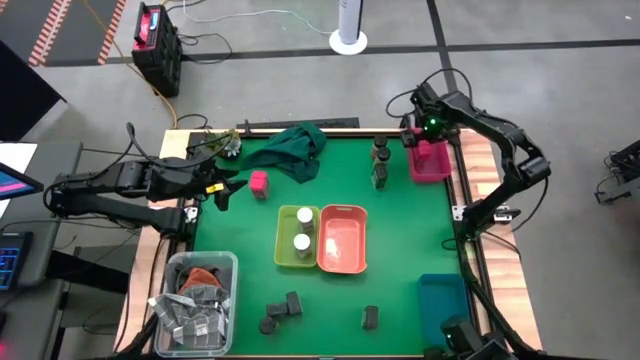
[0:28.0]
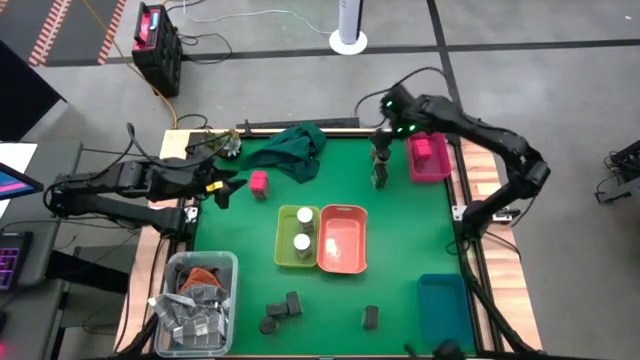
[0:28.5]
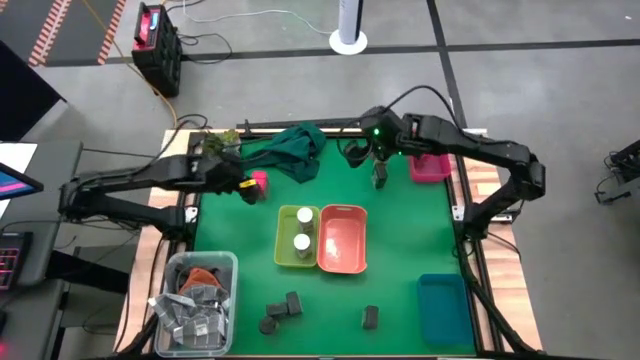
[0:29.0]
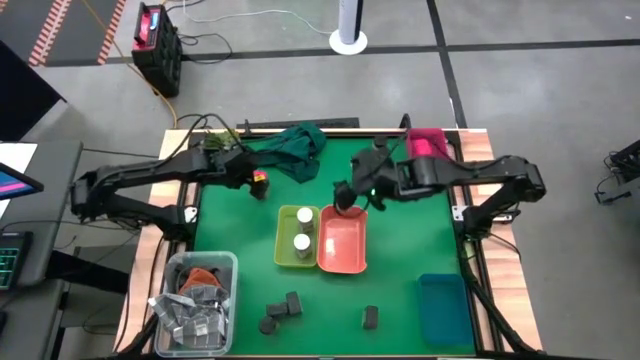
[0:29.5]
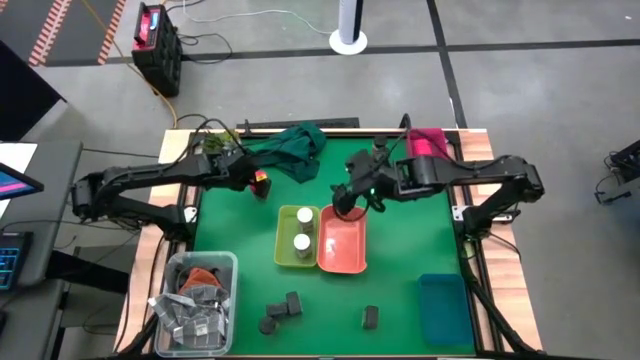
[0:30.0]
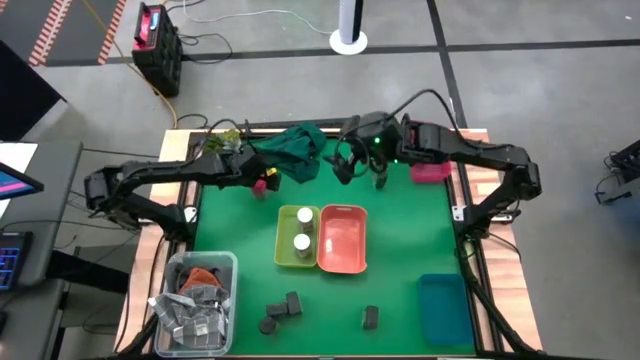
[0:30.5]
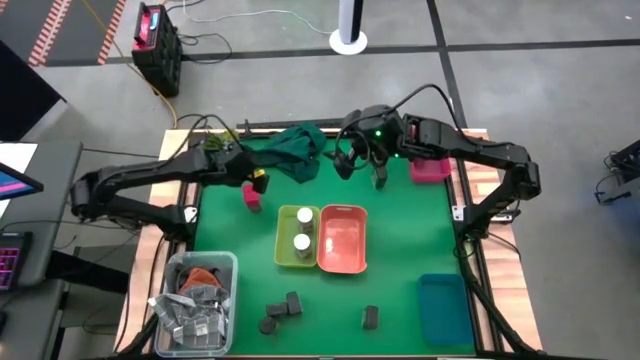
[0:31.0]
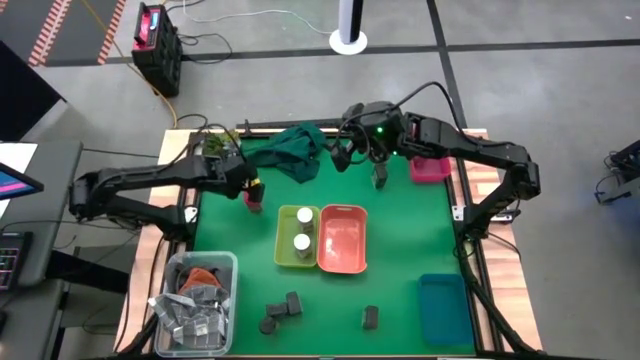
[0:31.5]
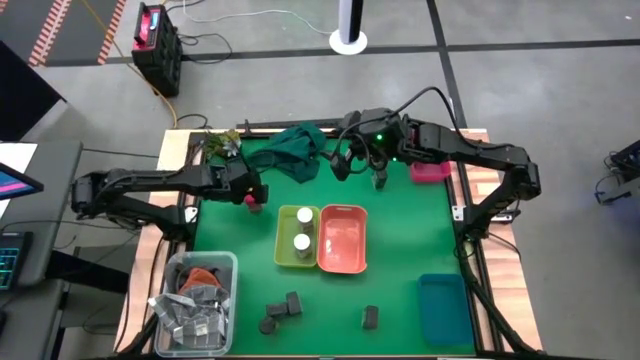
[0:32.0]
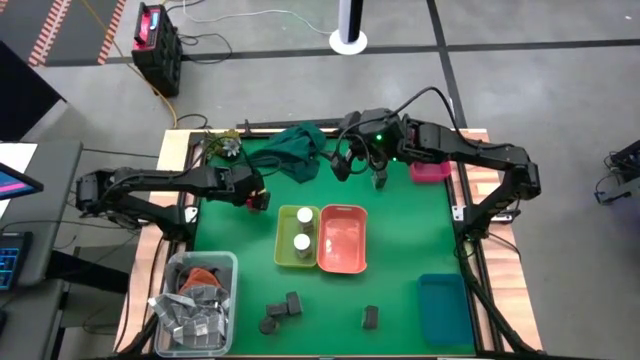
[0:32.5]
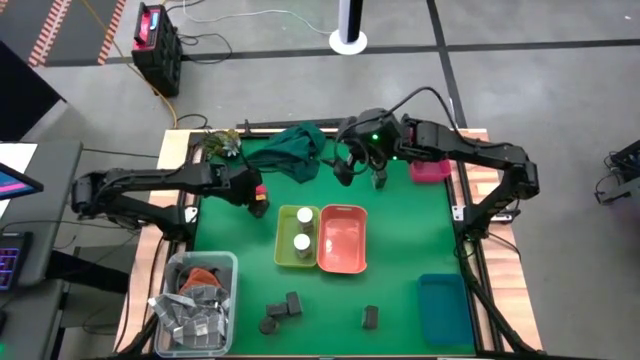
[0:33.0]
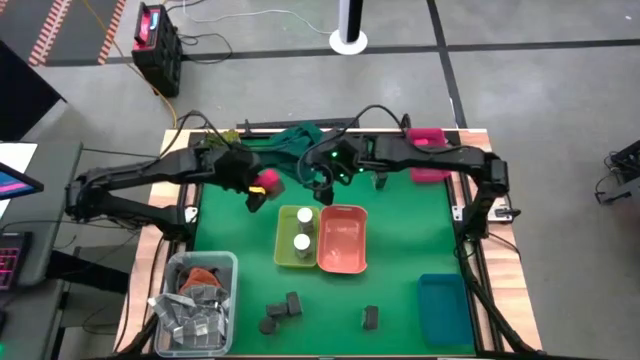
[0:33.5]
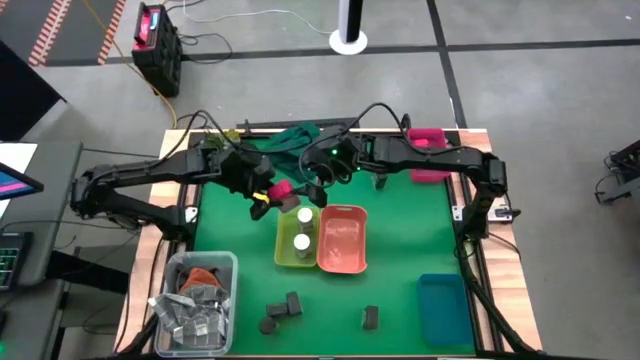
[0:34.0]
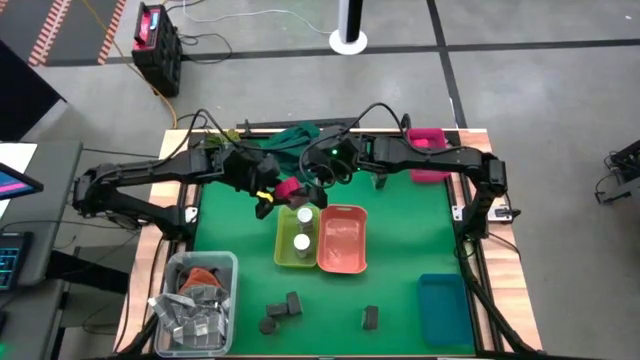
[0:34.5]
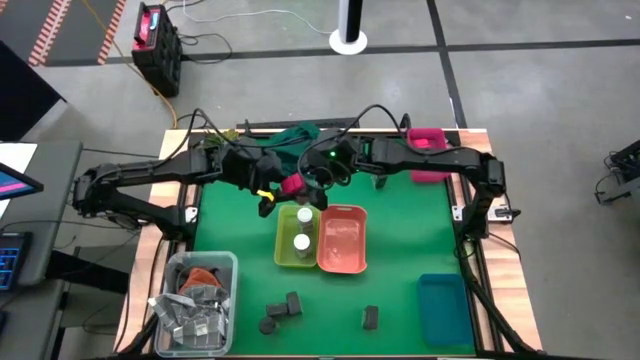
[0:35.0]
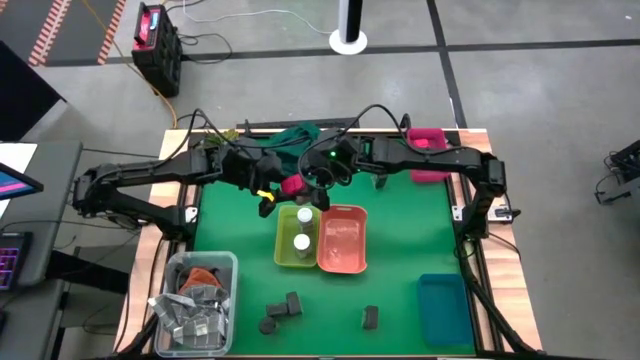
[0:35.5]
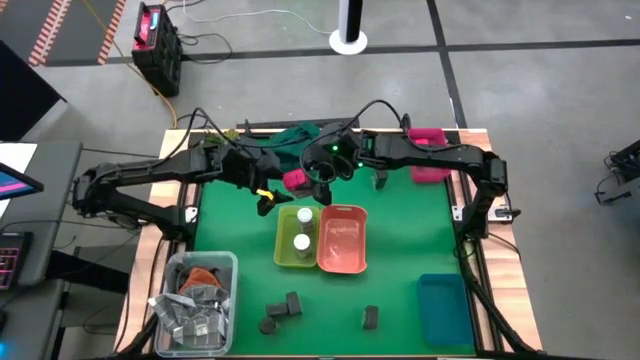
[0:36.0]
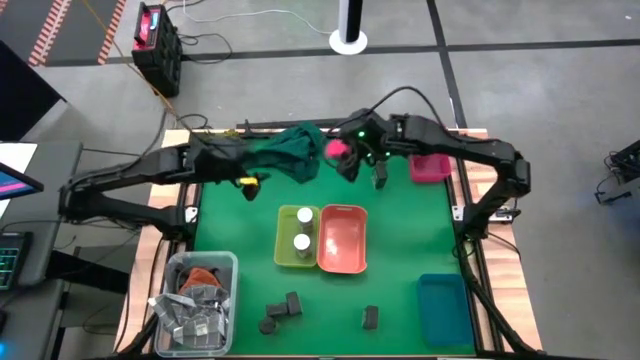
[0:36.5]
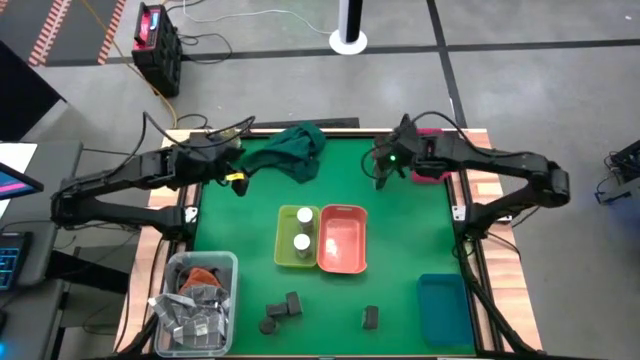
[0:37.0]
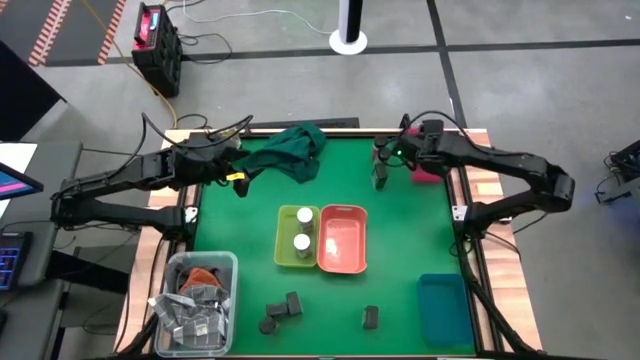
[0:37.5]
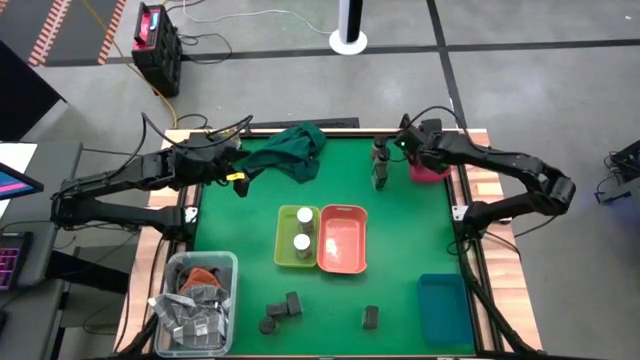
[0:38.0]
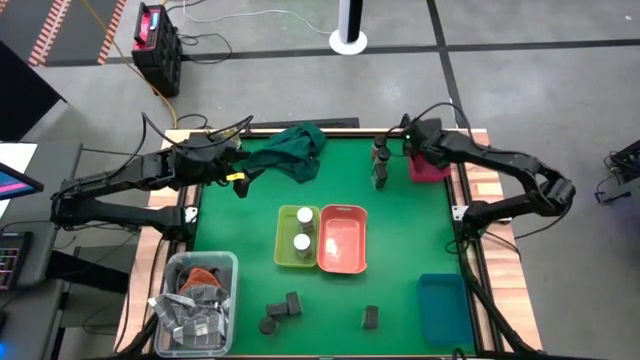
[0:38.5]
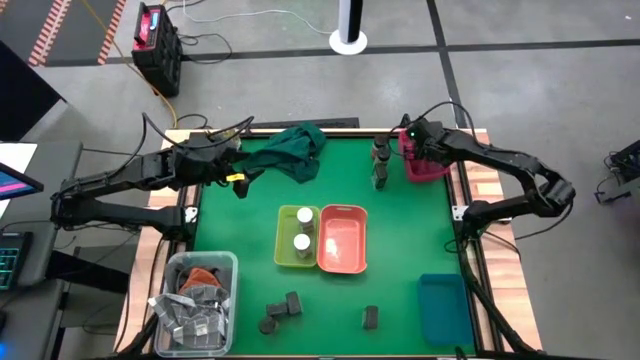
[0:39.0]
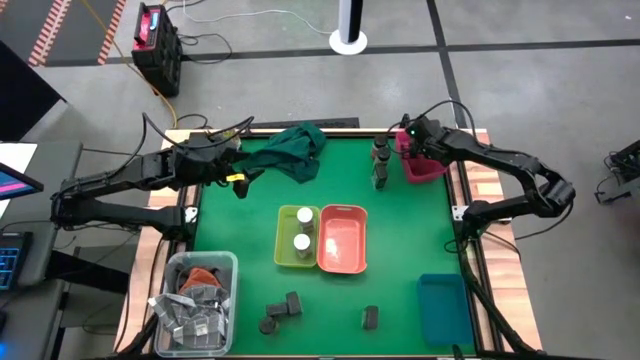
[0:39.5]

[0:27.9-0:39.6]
Task: Sort spices by type
Put the red seasoning can into the pink bin

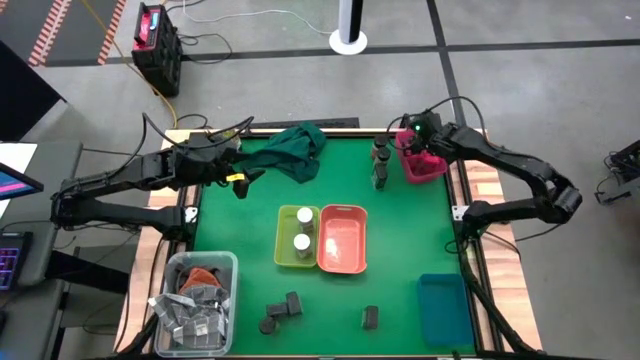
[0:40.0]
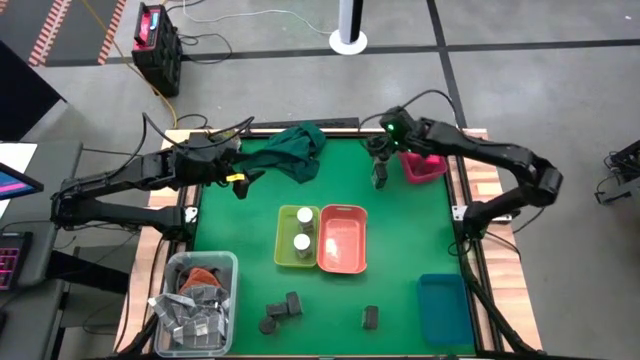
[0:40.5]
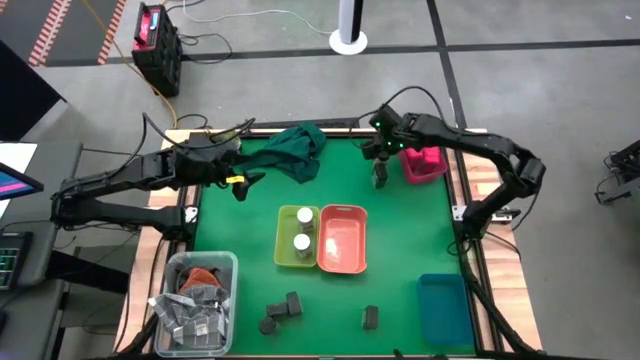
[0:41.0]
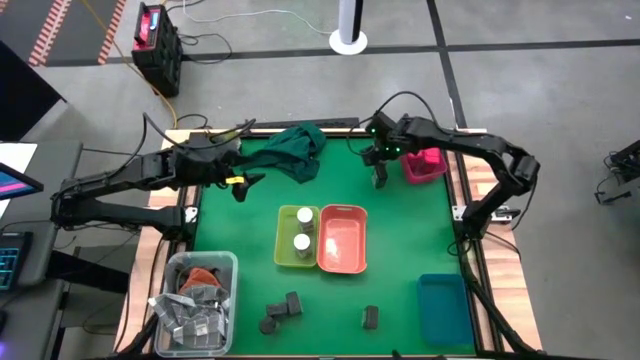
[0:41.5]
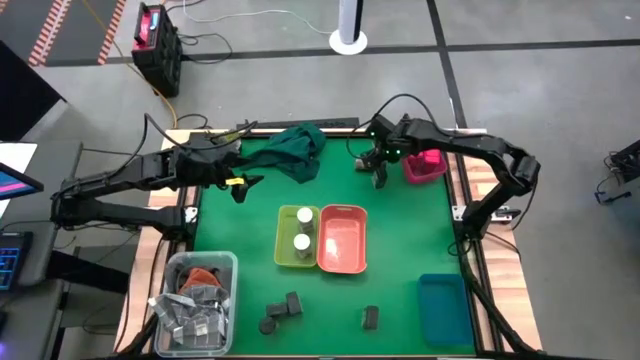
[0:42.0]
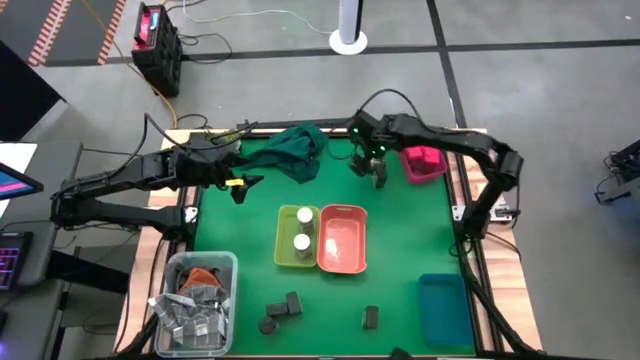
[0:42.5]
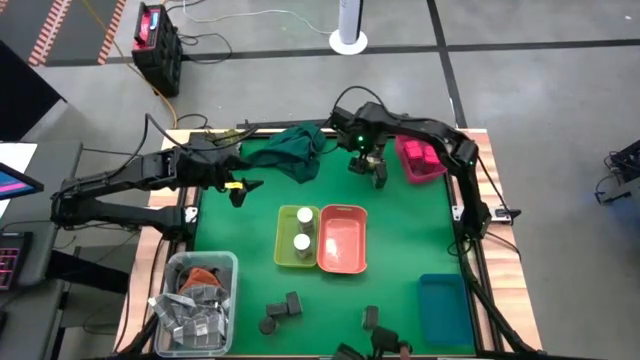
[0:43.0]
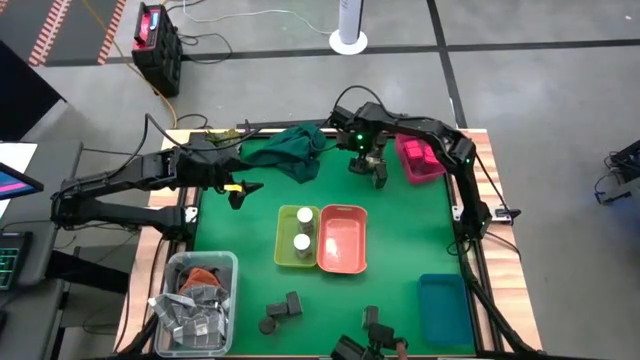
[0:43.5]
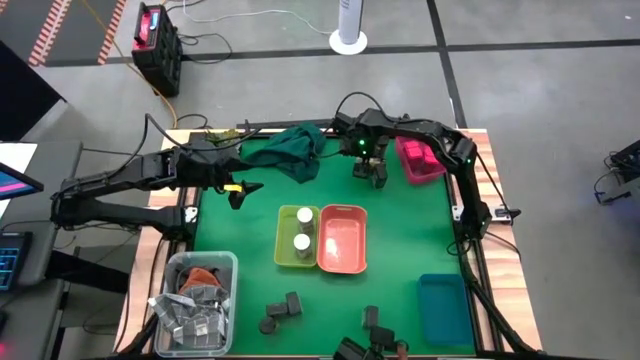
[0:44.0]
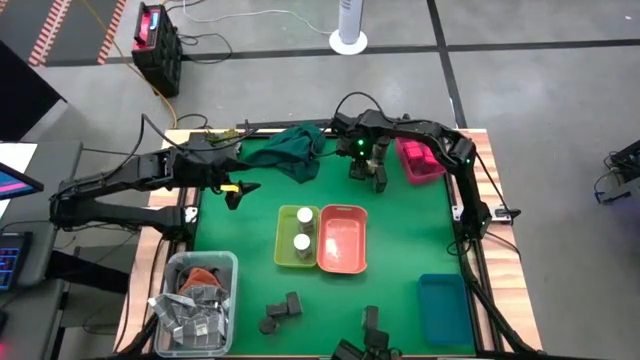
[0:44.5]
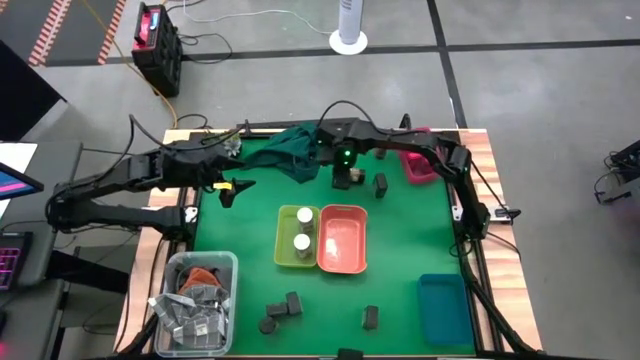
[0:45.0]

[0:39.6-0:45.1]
Put the middle black seasoning bottle into the blue bin

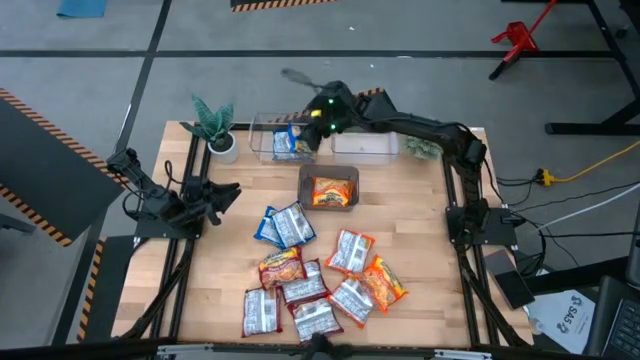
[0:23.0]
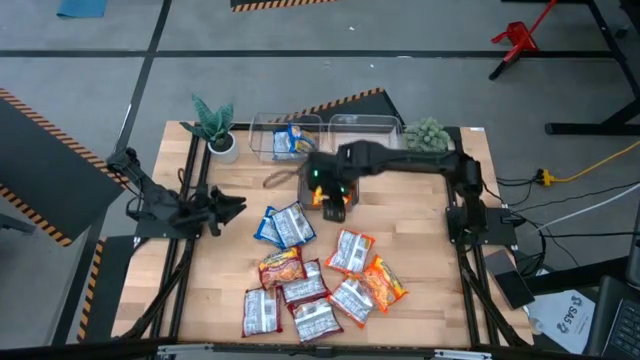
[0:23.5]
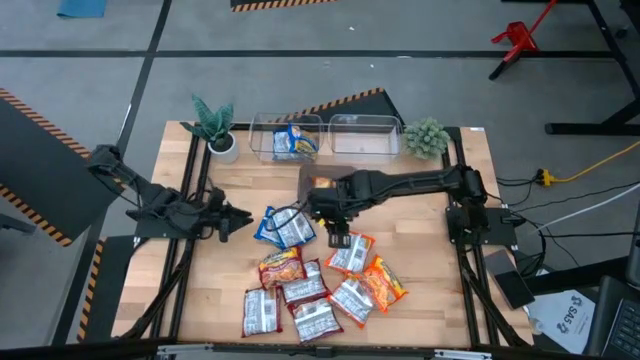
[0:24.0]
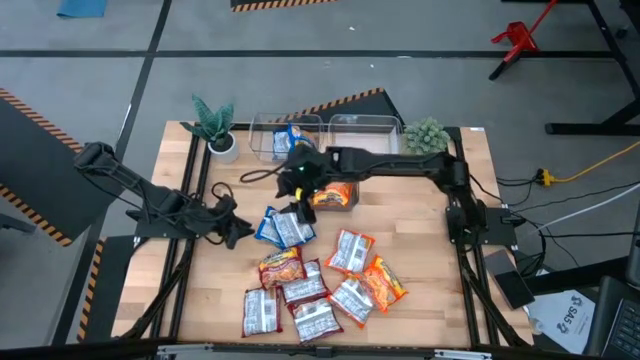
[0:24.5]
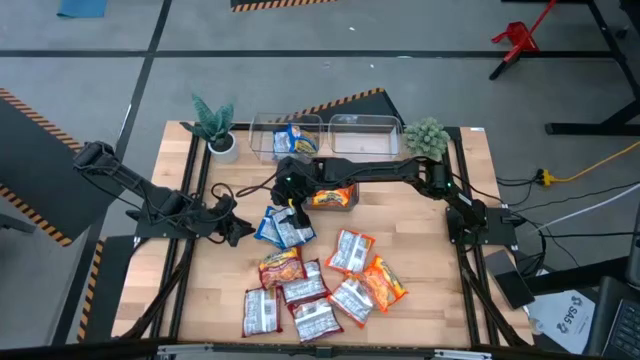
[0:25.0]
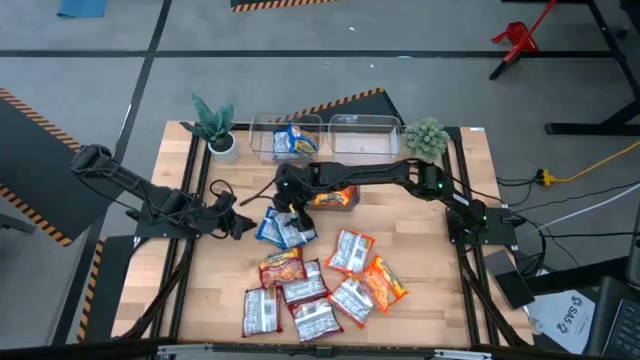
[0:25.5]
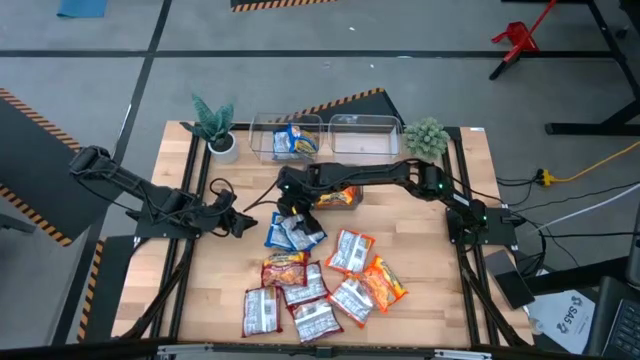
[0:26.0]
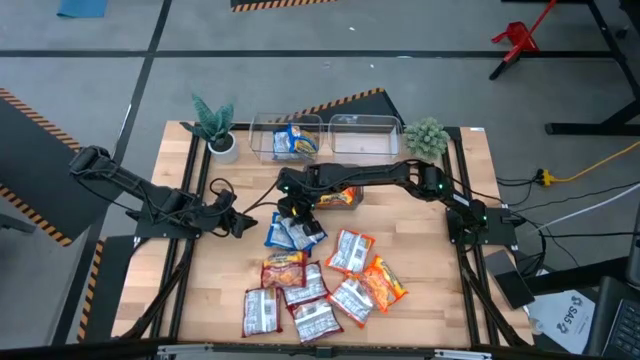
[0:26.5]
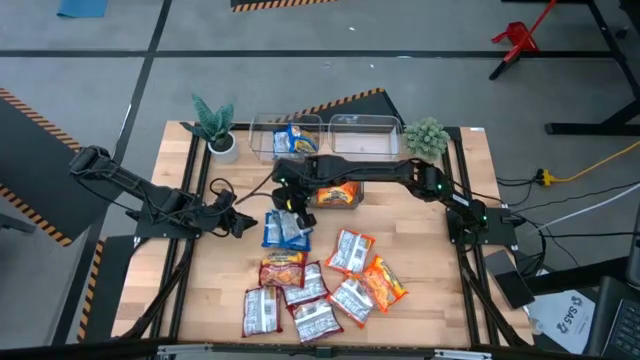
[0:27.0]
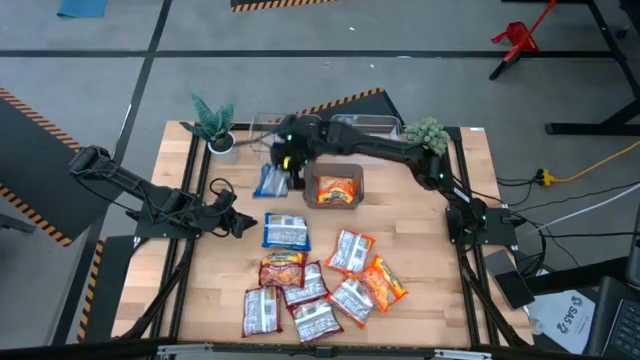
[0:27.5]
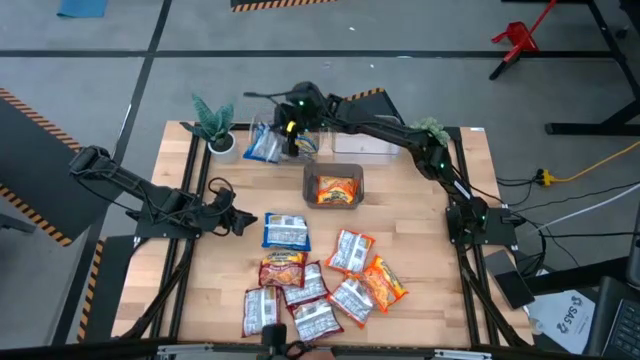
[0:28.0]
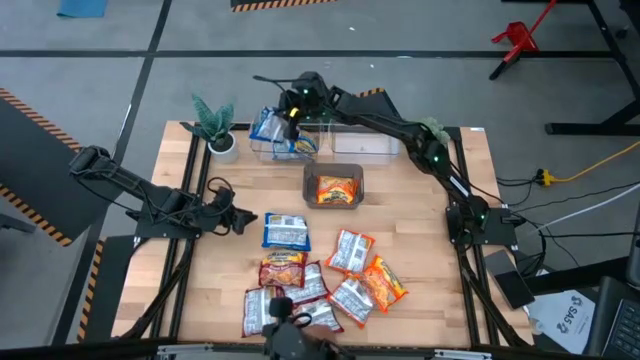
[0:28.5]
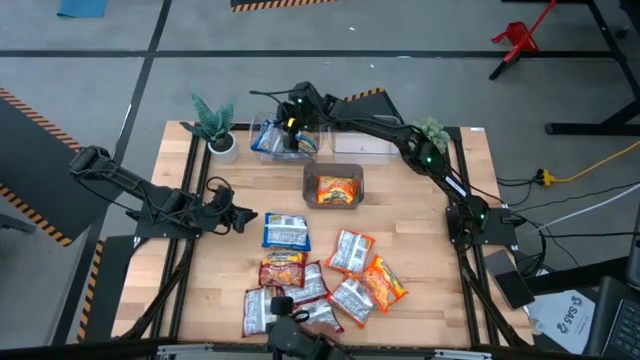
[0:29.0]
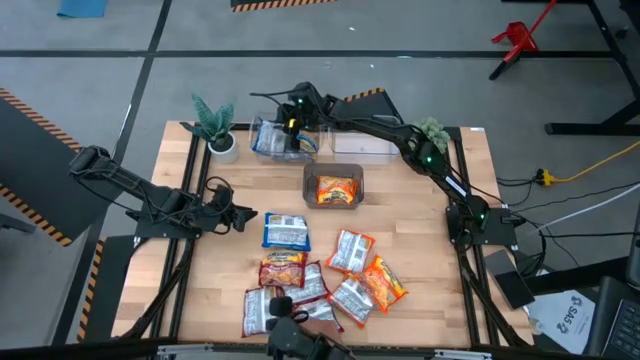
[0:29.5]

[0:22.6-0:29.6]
Task: Sort Maruchan noodles
Put the blue noodle pack into the left transparent bin
